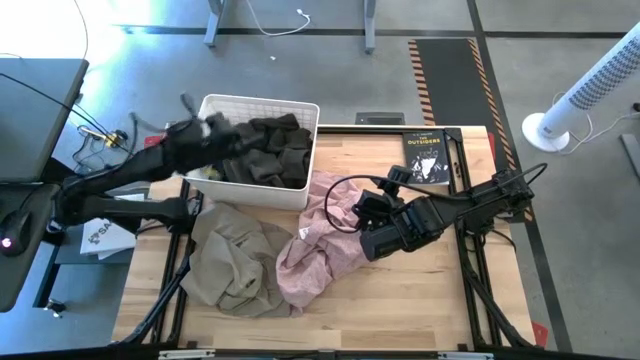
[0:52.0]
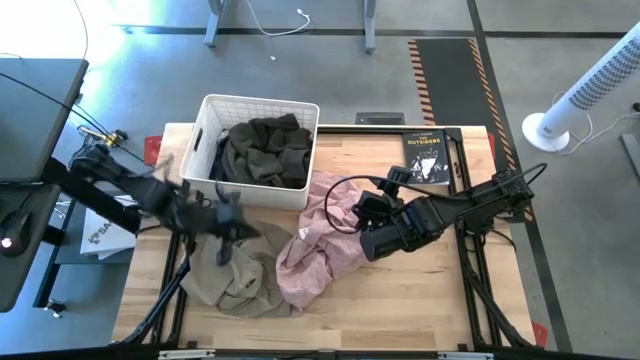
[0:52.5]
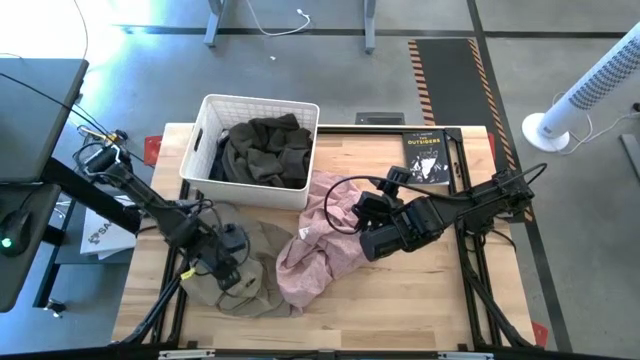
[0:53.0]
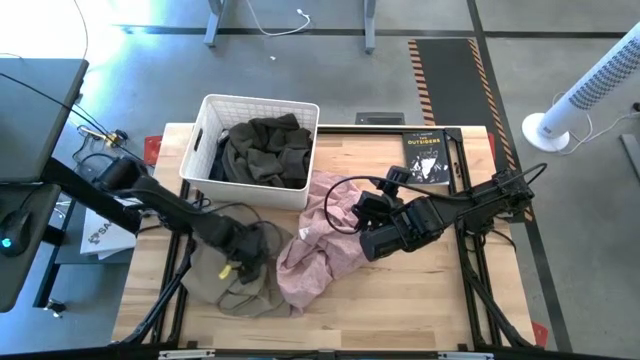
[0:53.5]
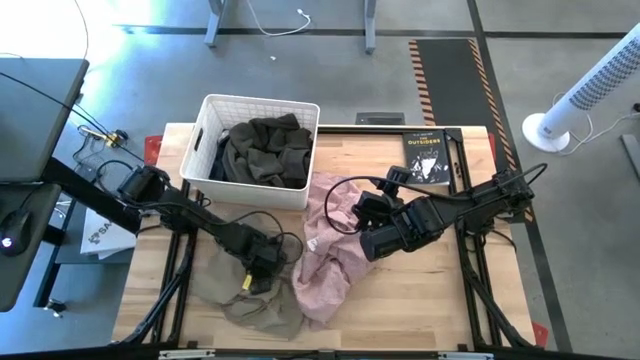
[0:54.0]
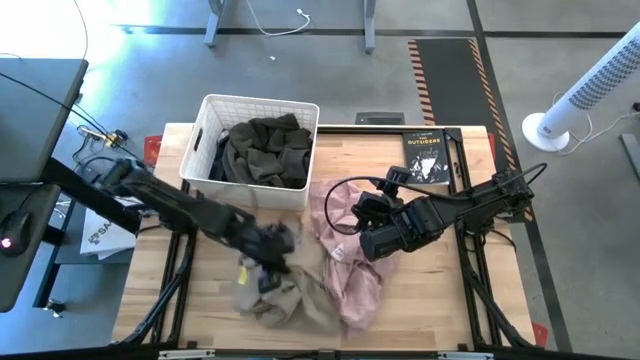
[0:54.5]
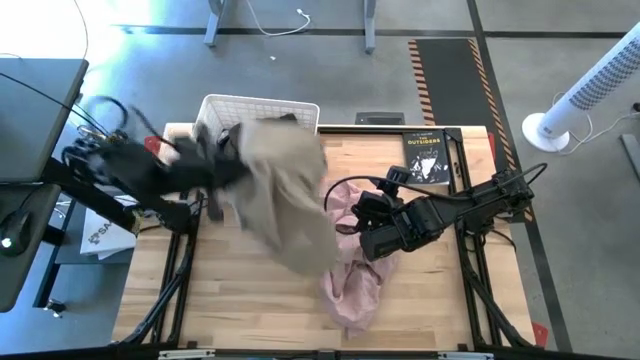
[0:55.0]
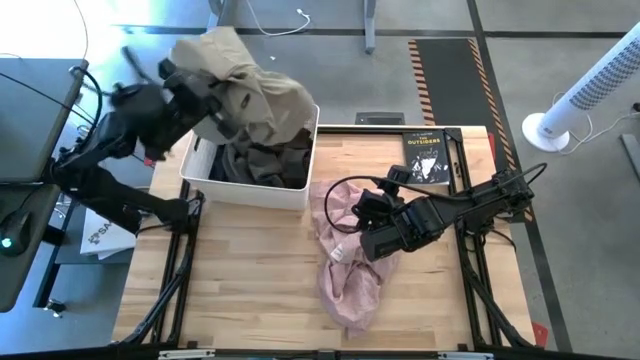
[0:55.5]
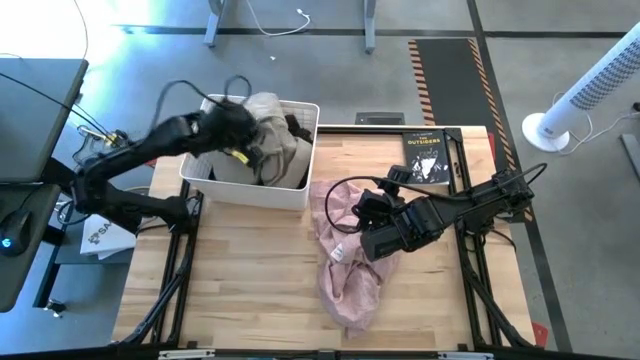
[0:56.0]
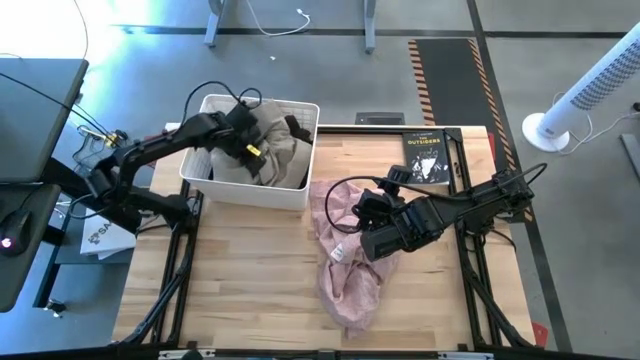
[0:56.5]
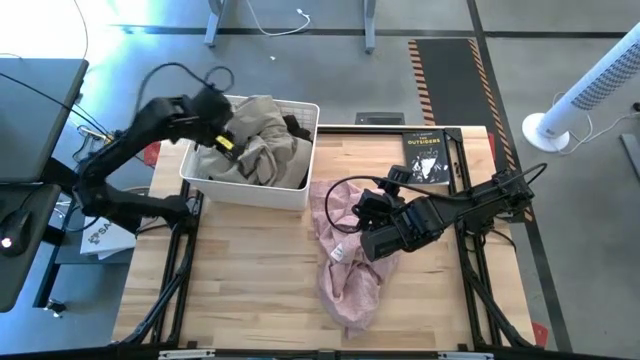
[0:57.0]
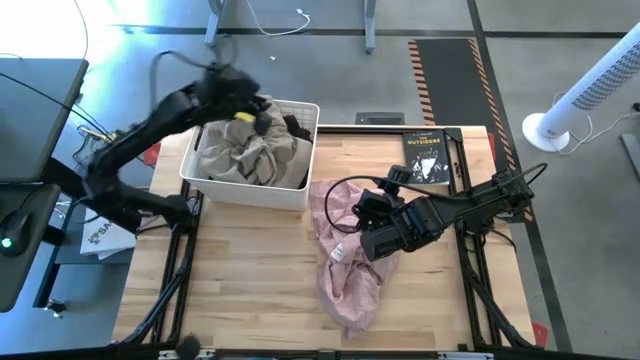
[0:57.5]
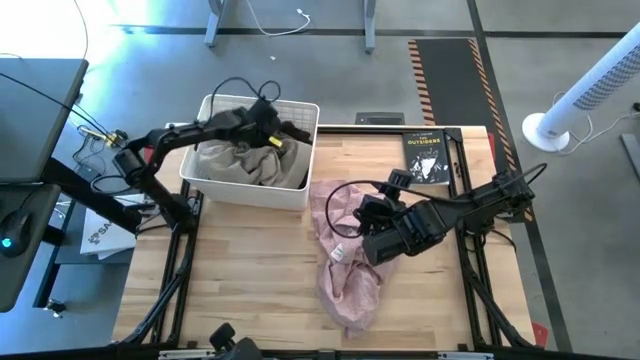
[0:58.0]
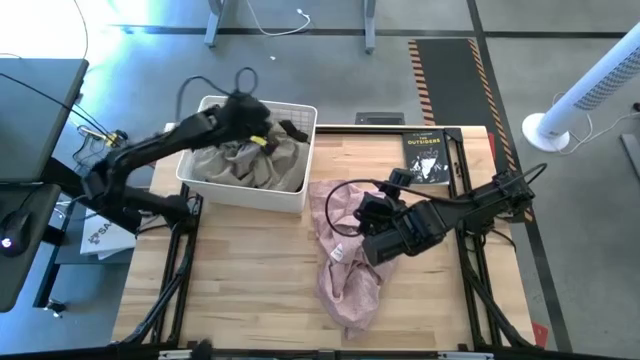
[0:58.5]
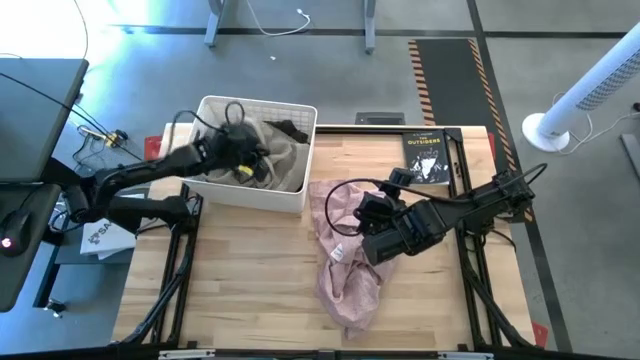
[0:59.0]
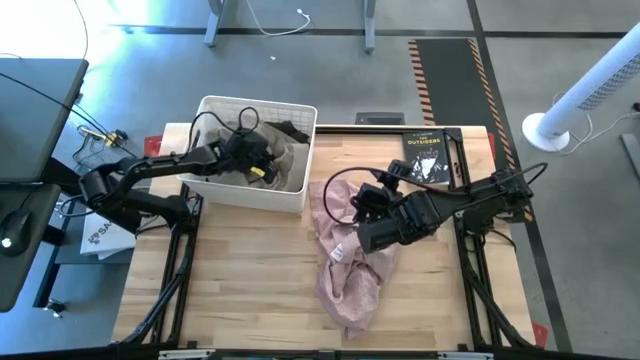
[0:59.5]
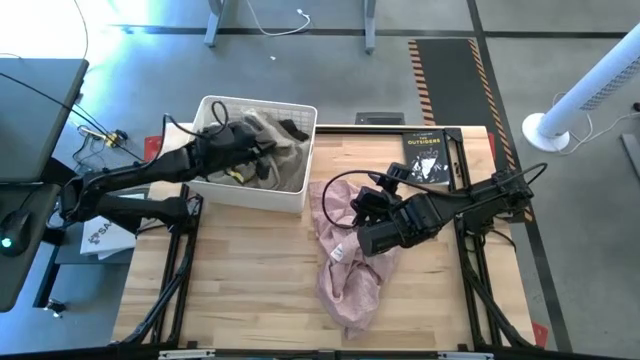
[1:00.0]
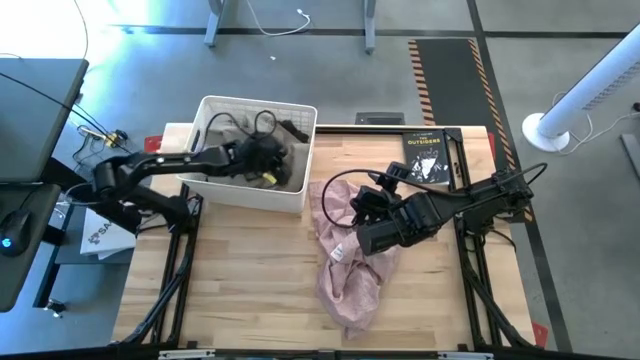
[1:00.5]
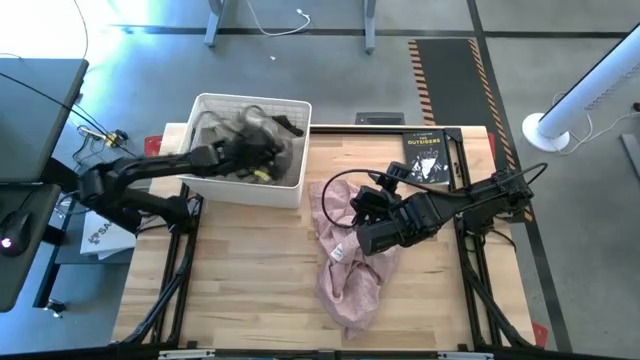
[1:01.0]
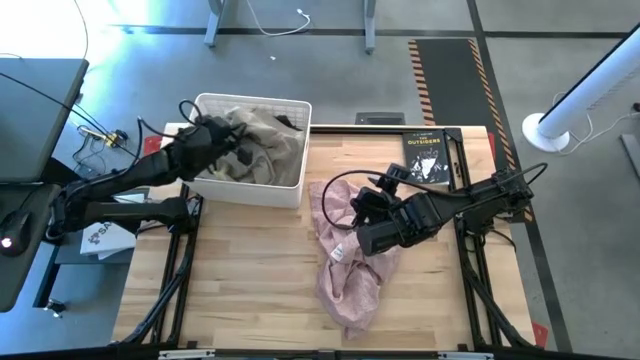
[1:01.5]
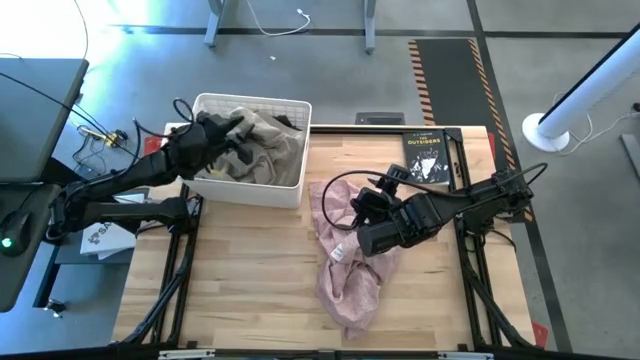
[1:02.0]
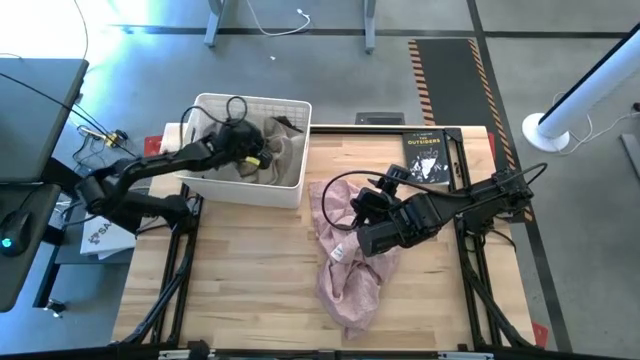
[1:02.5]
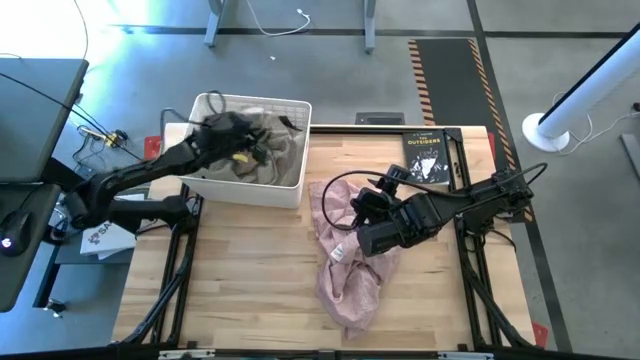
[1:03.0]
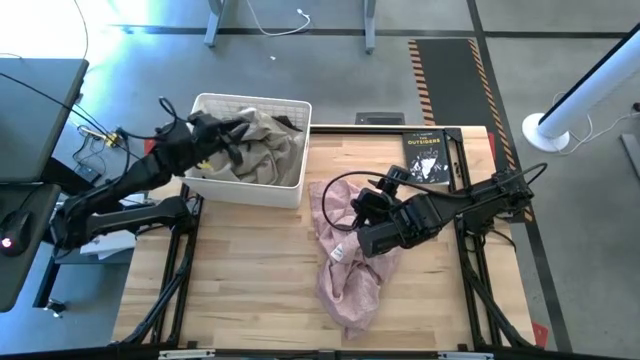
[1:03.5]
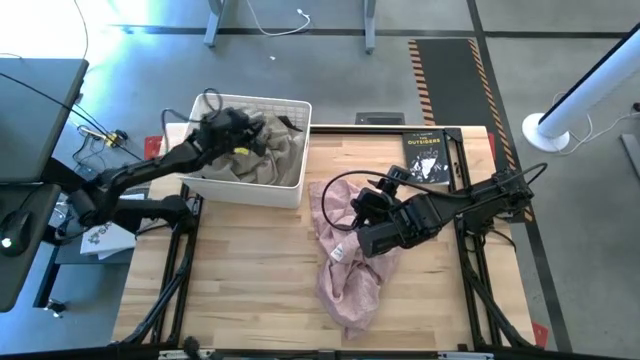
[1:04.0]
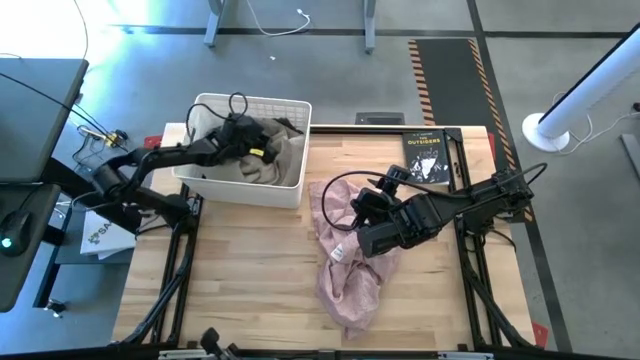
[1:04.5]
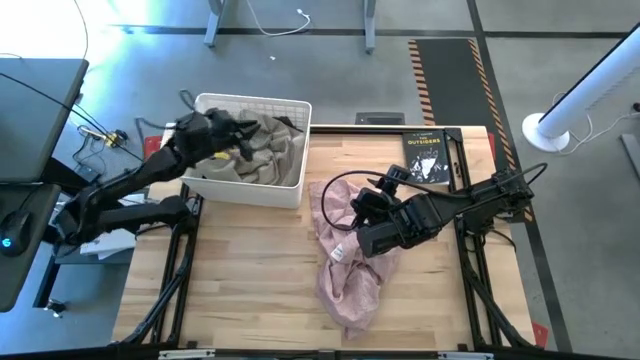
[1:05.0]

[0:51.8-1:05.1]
Task: Sort clothes
Put the brown polo shirt into the laundry bin

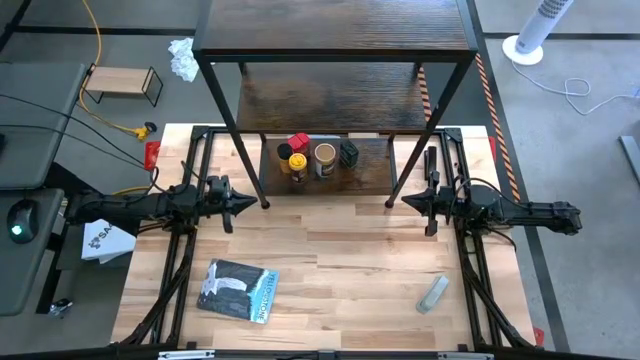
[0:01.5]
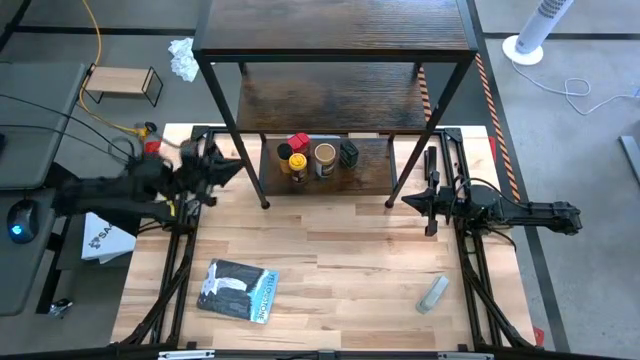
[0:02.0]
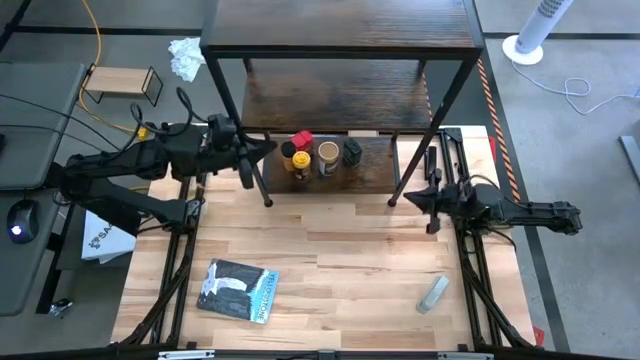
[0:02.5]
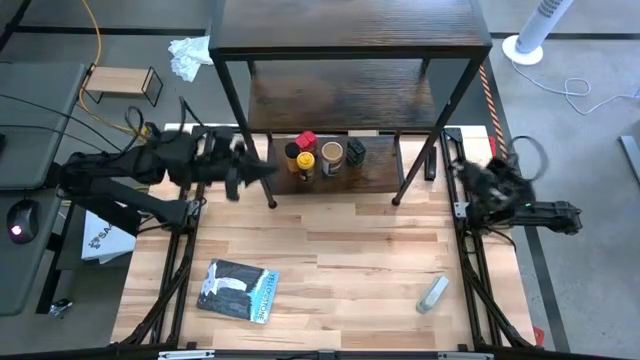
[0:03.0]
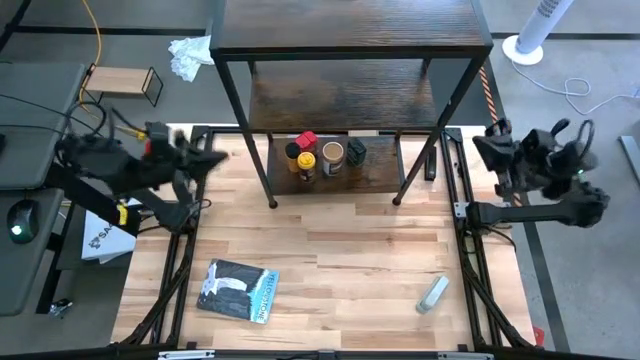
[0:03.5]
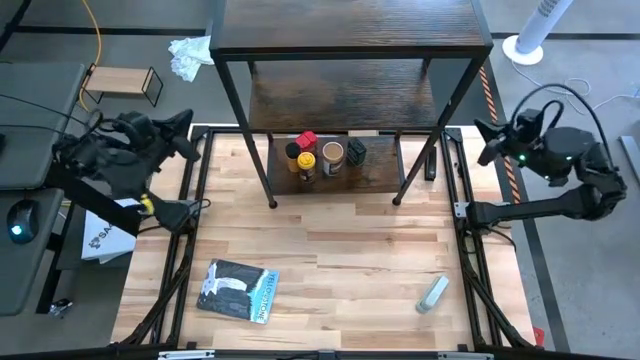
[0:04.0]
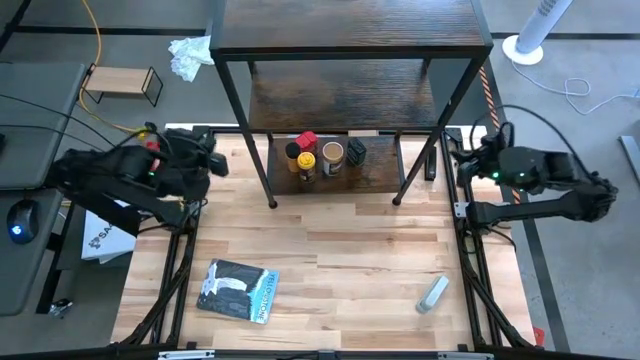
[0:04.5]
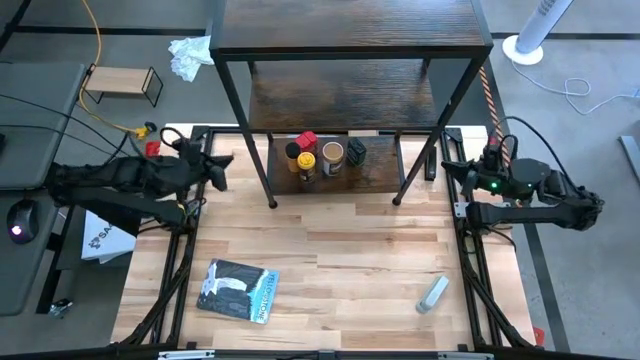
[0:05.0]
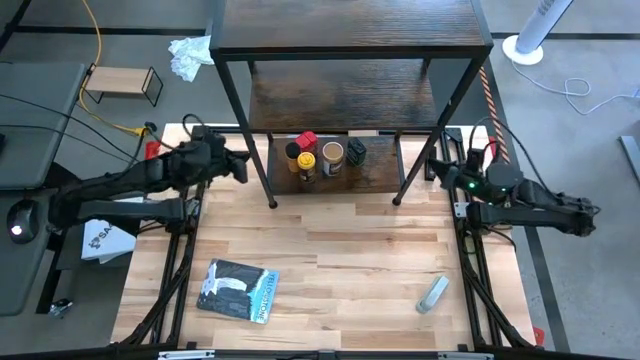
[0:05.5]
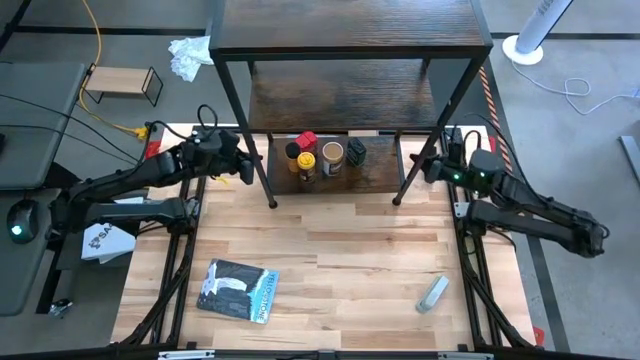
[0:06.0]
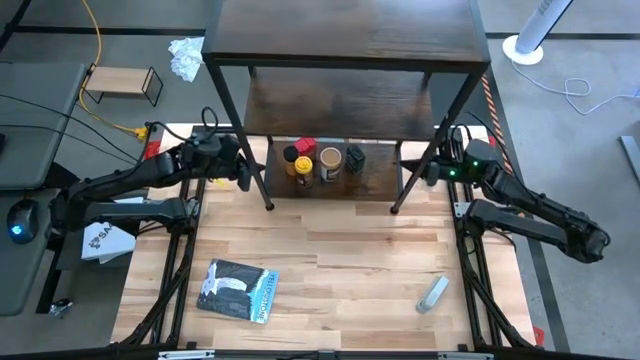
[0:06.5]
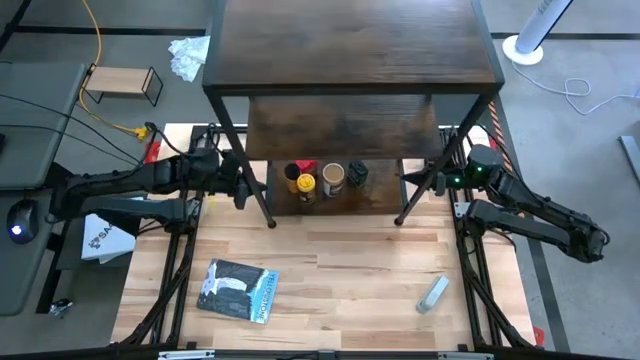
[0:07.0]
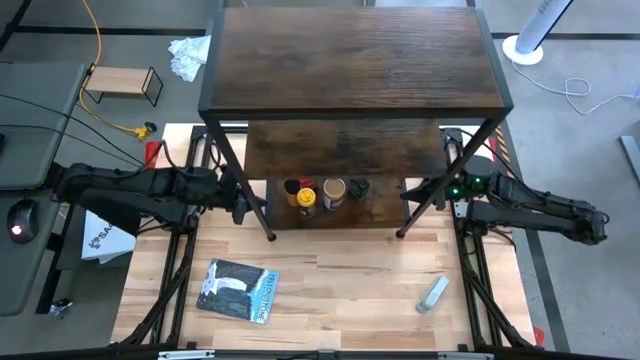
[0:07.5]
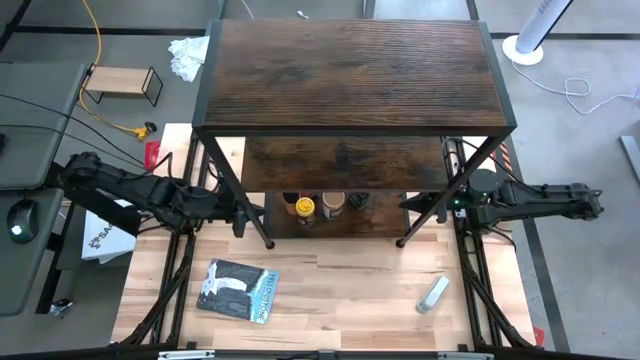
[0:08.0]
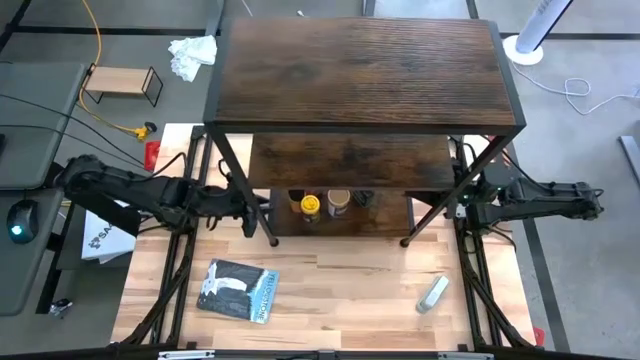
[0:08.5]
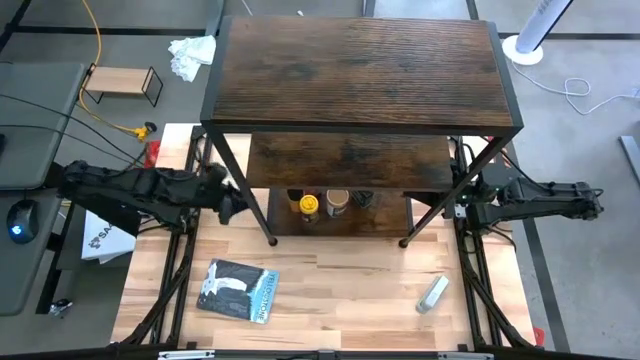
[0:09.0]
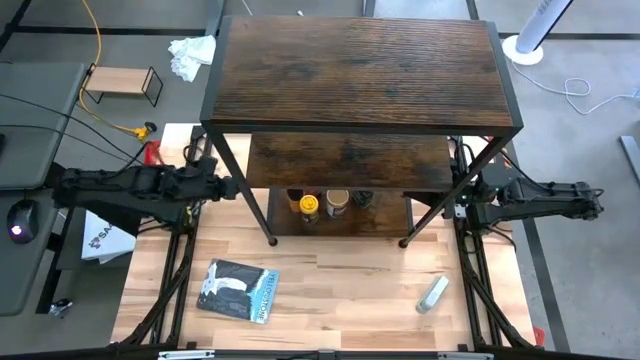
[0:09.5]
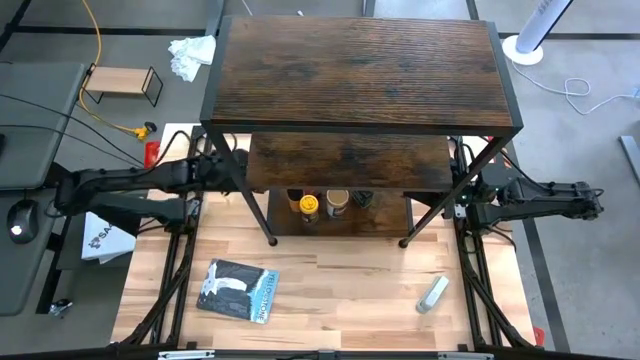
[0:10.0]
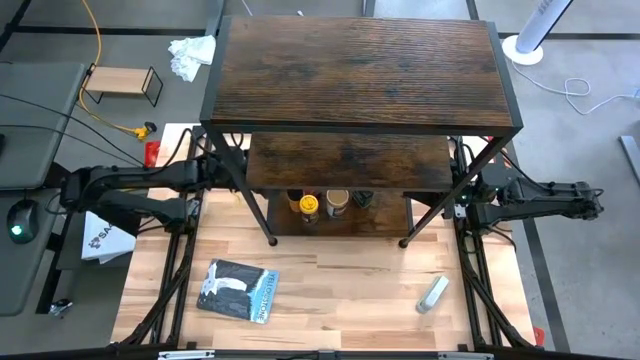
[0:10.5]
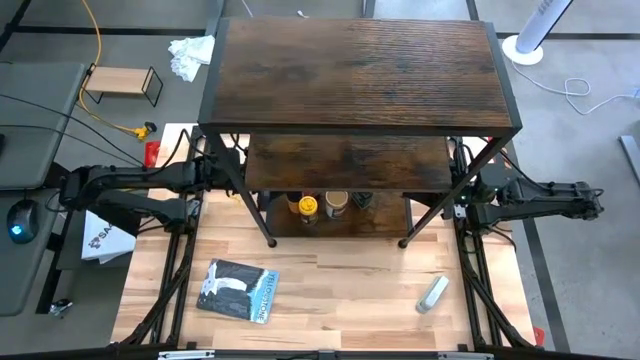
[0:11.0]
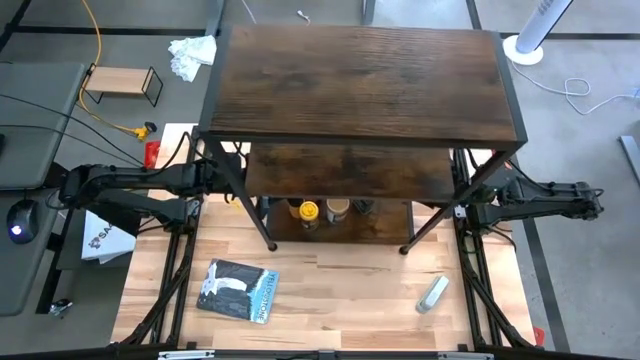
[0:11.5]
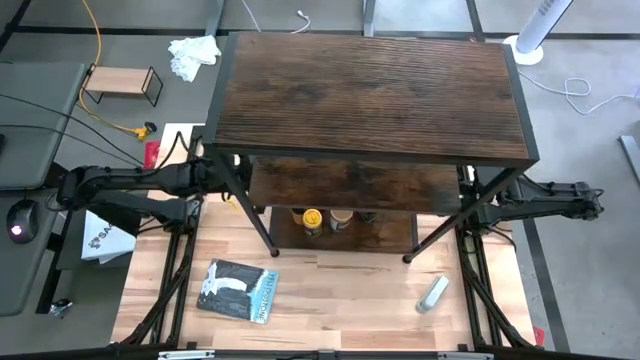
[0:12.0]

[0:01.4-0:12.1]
Task: Shelf spices
Move the shelf to the center of the table
